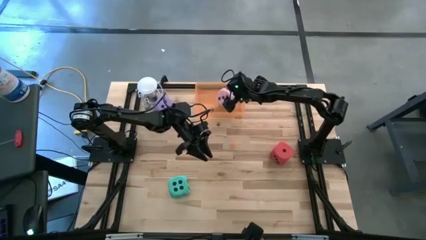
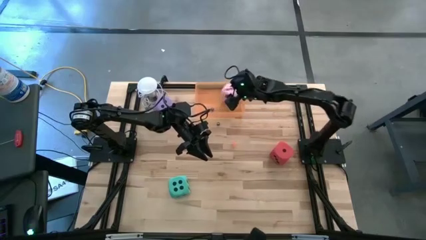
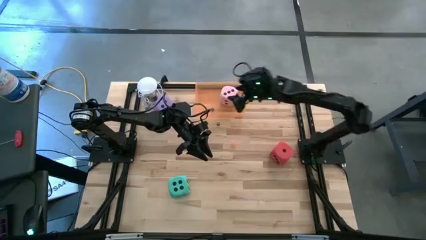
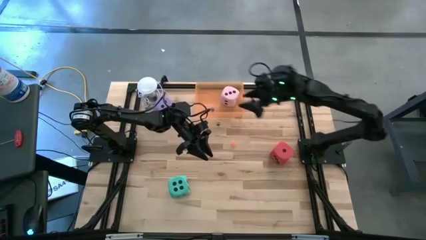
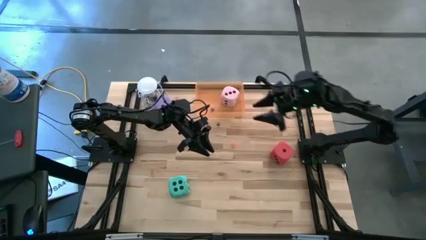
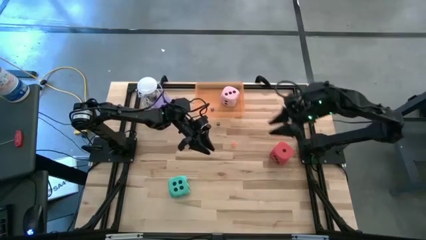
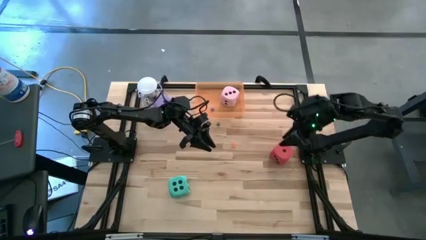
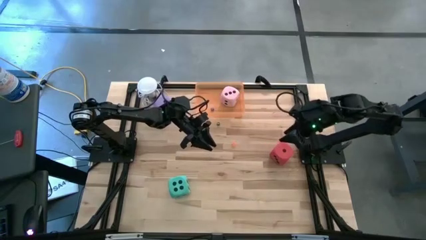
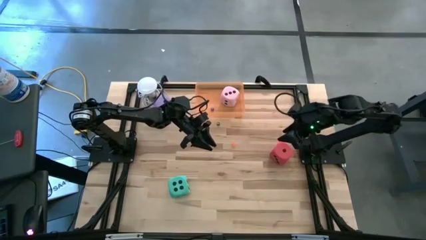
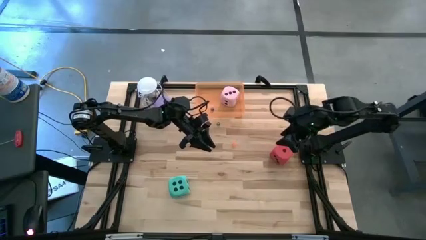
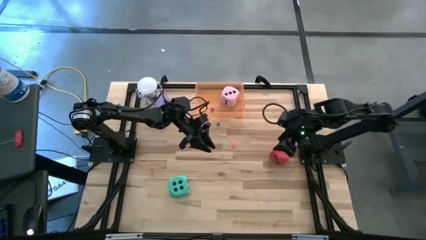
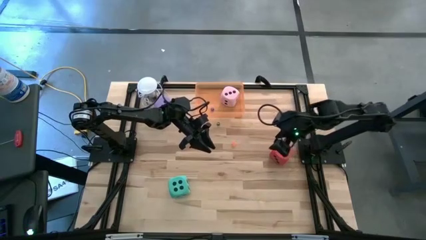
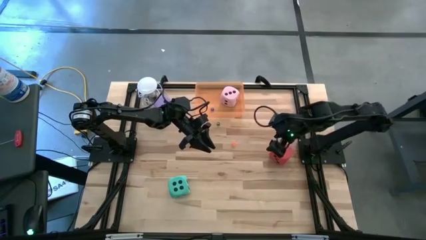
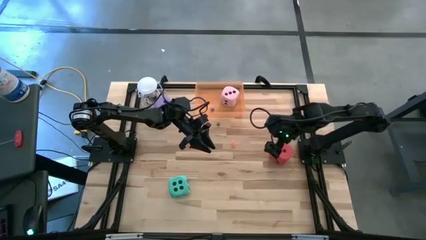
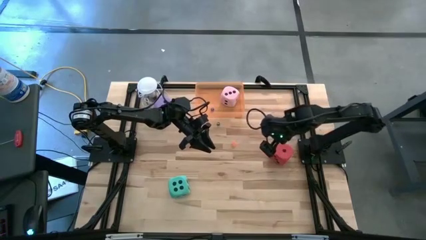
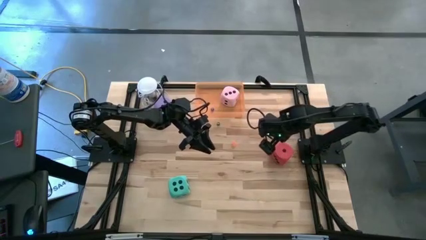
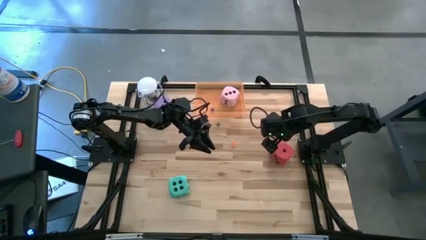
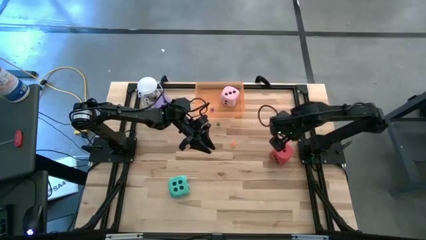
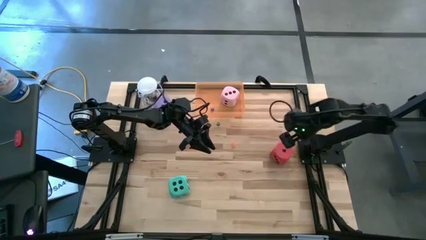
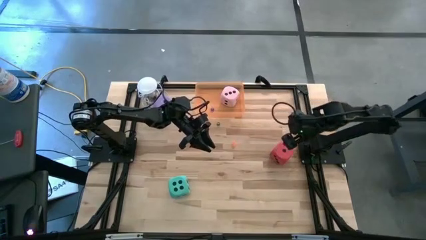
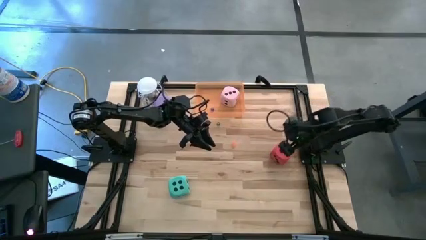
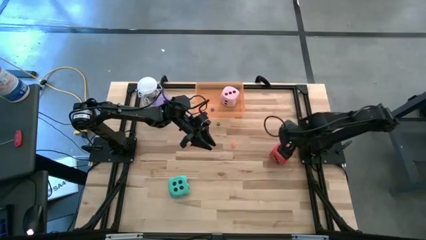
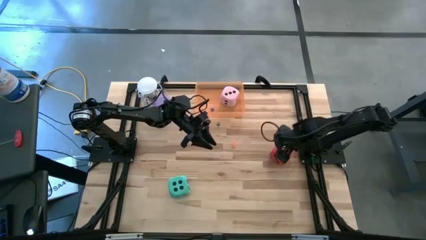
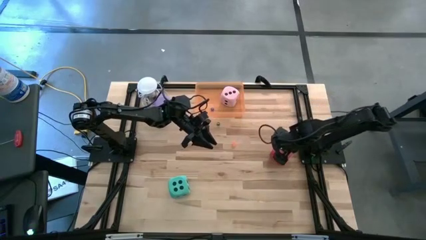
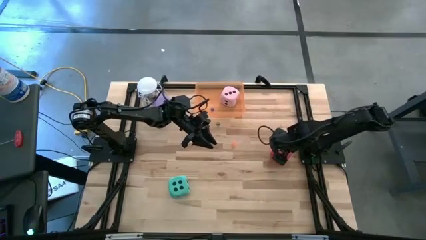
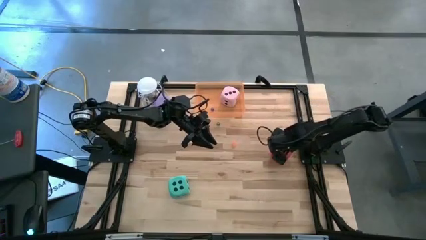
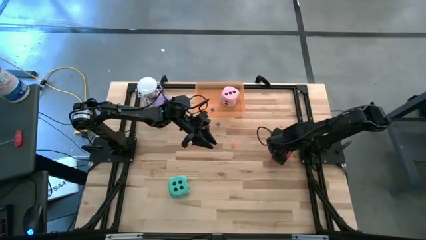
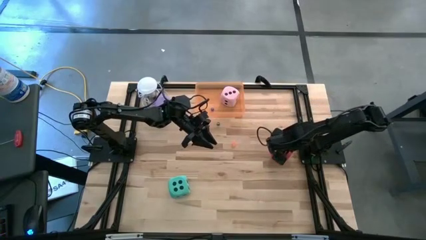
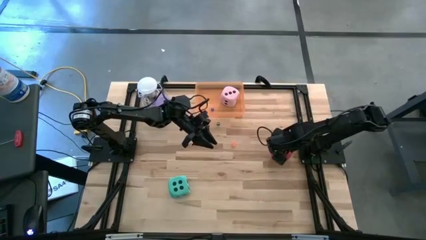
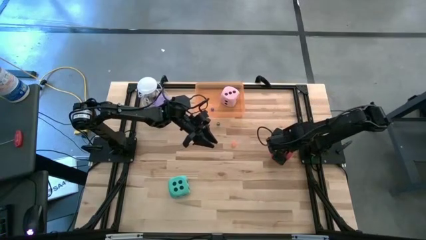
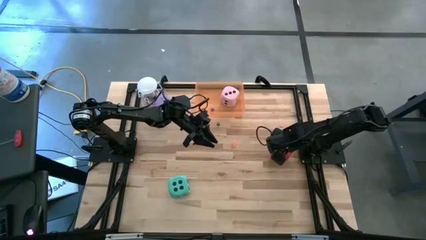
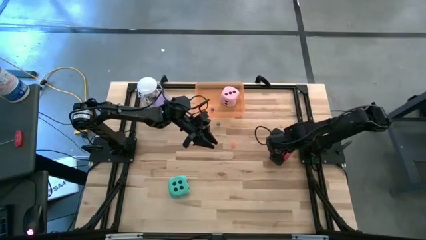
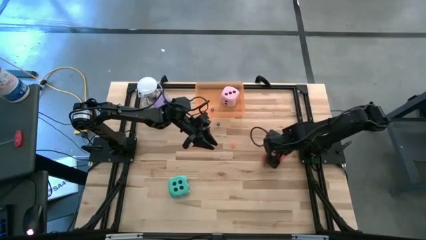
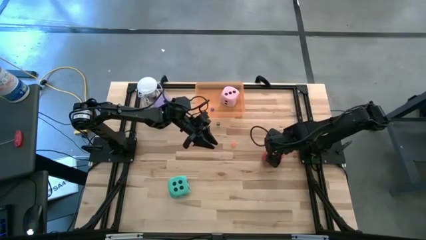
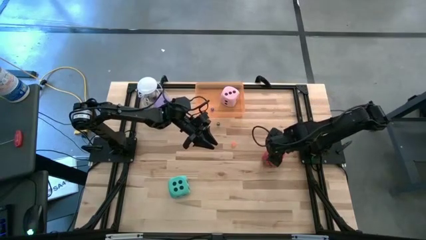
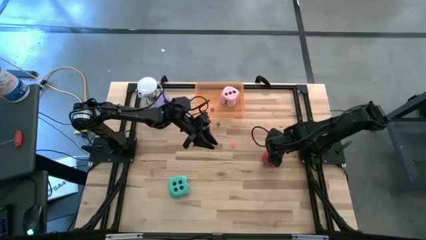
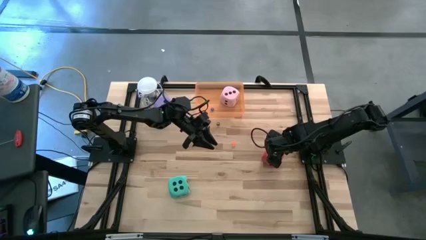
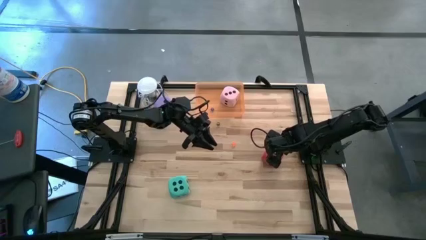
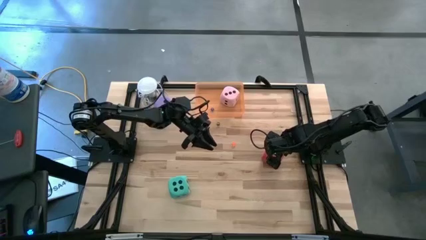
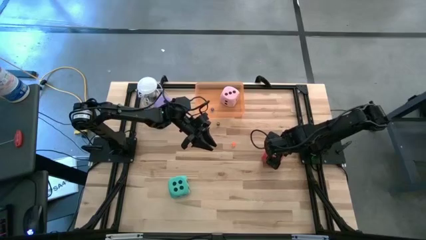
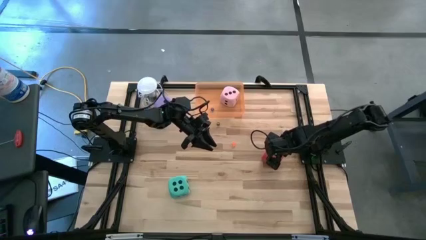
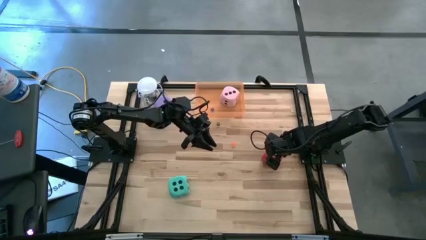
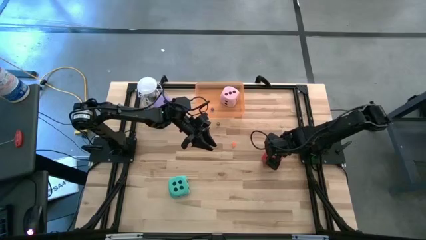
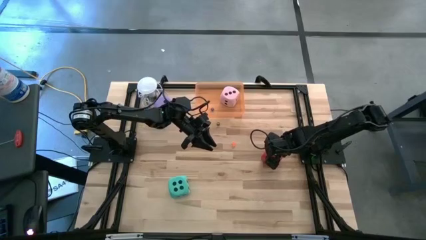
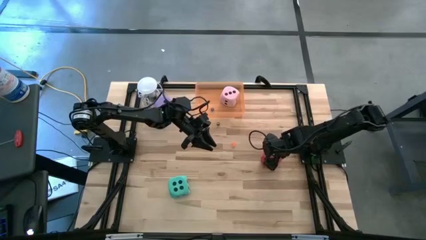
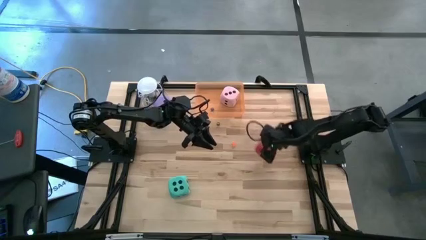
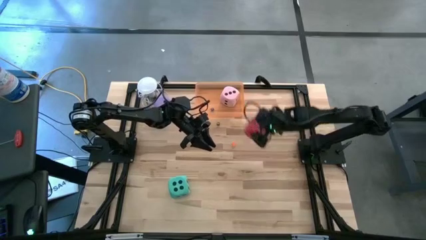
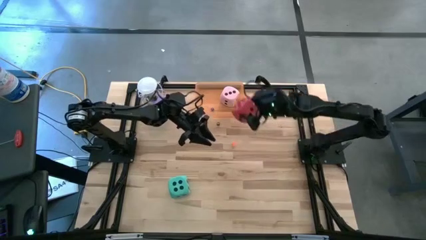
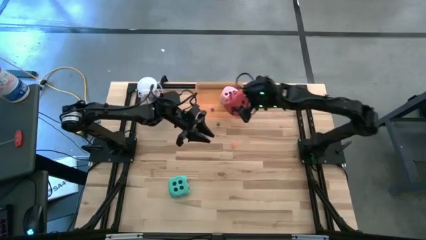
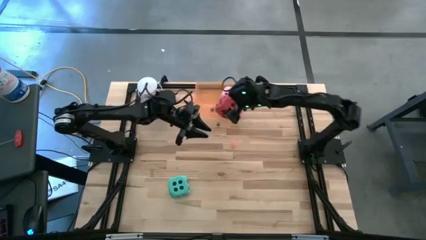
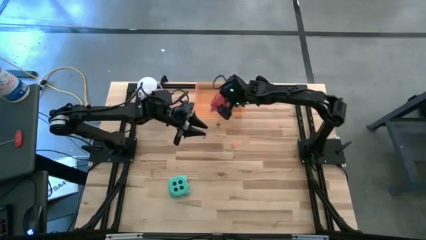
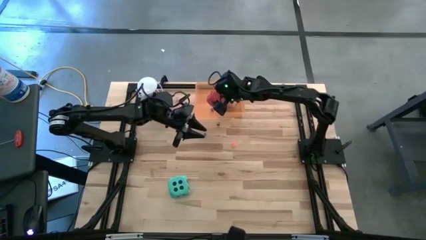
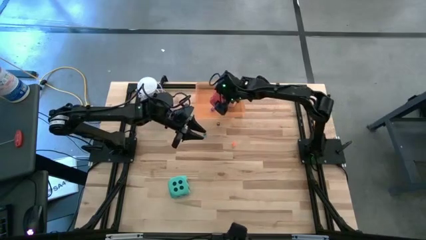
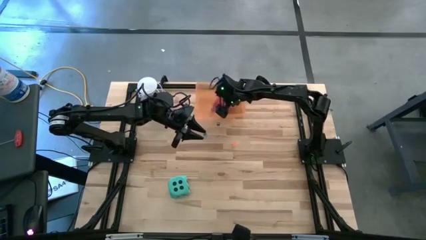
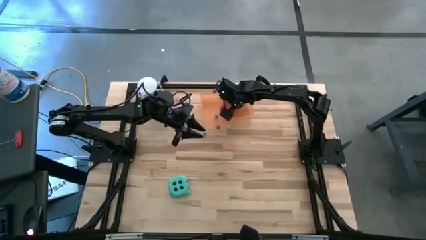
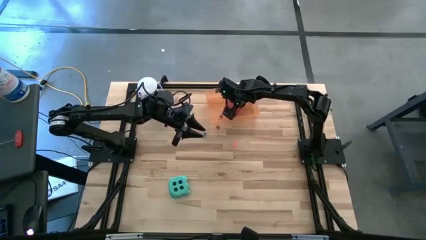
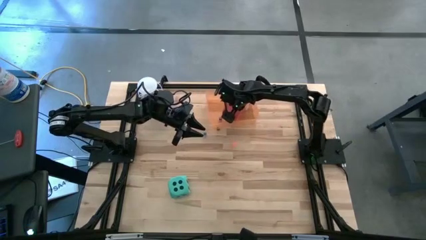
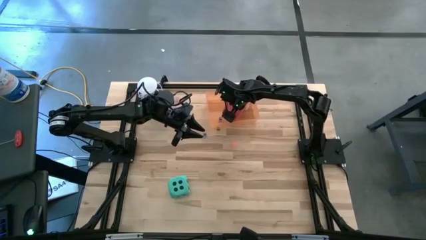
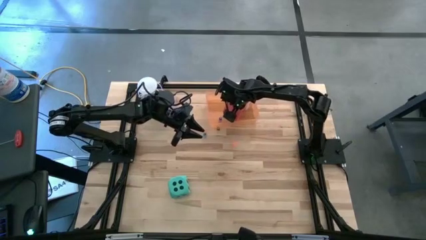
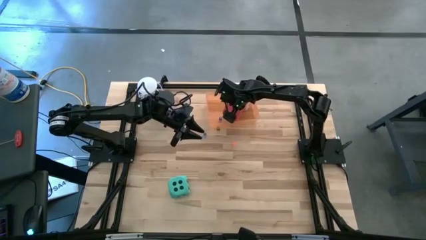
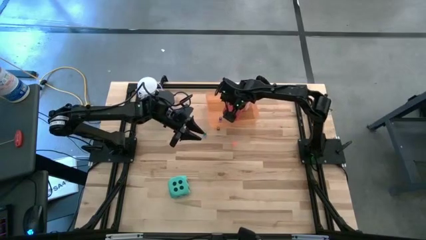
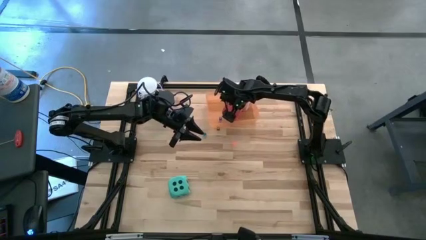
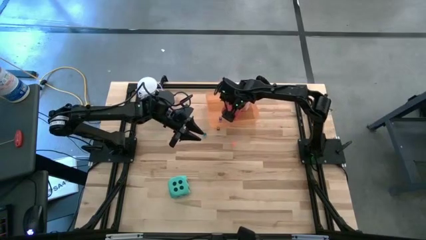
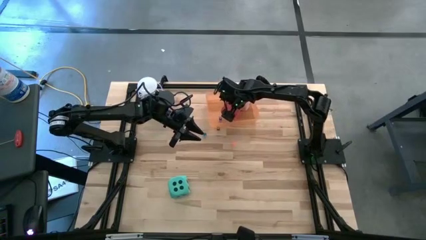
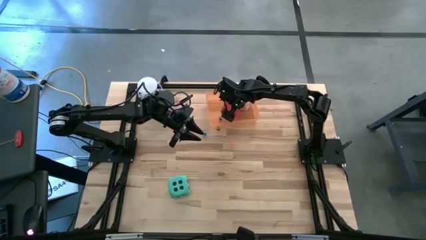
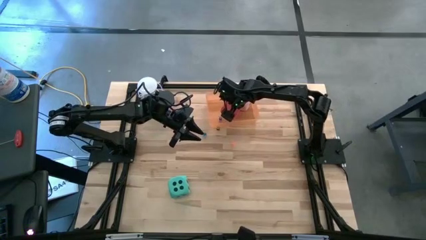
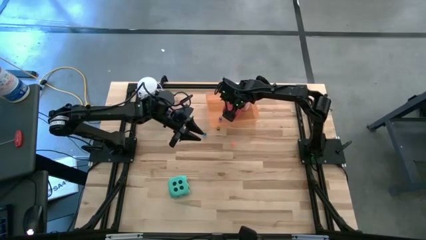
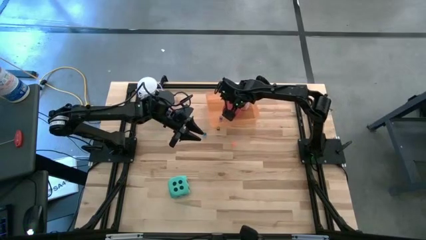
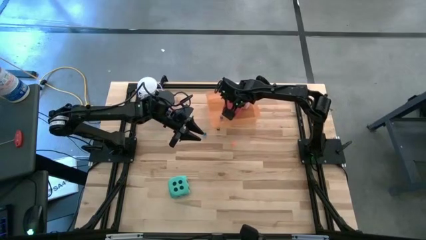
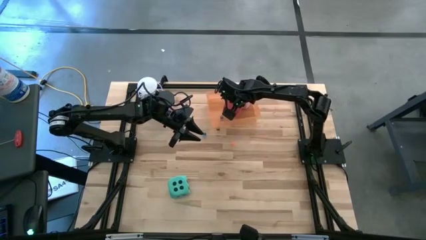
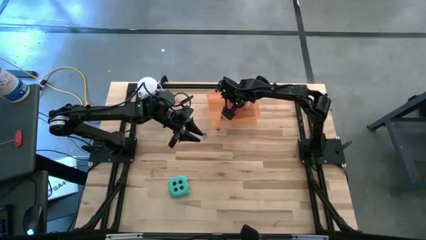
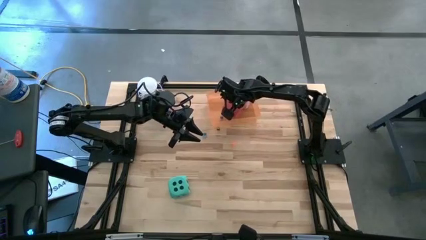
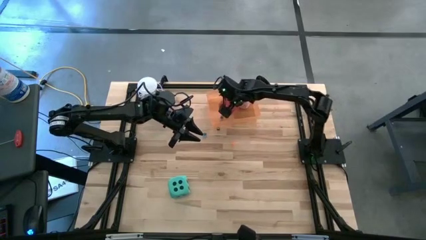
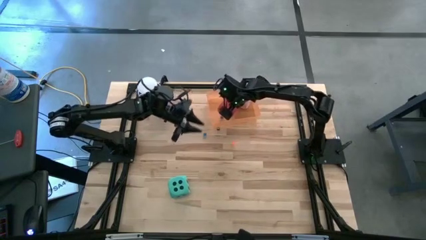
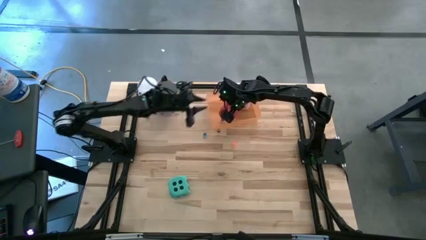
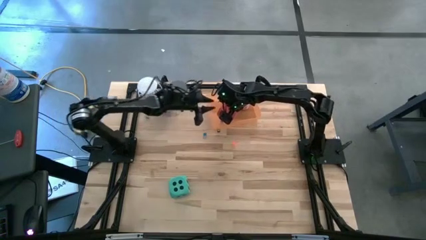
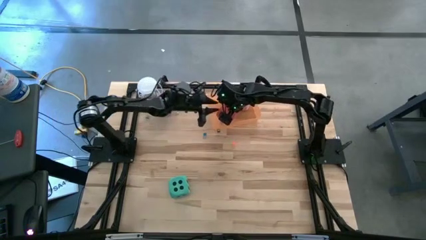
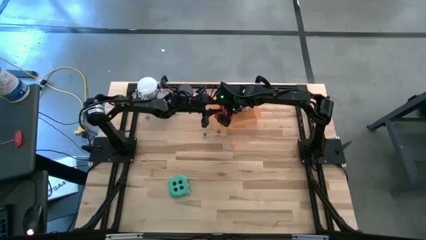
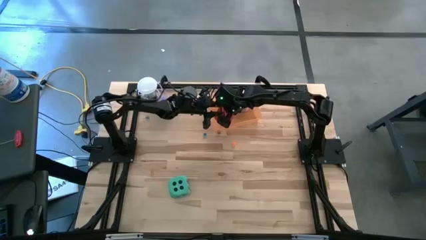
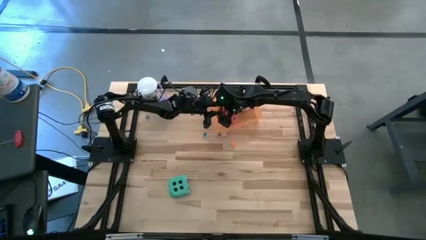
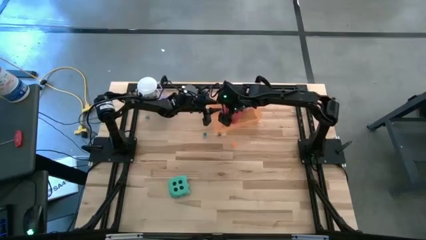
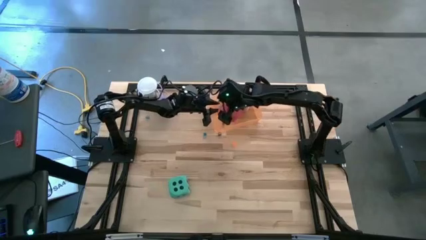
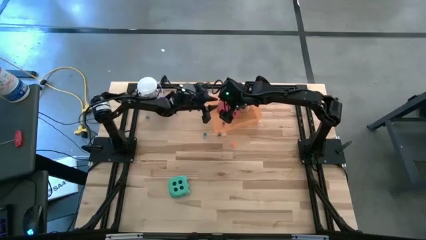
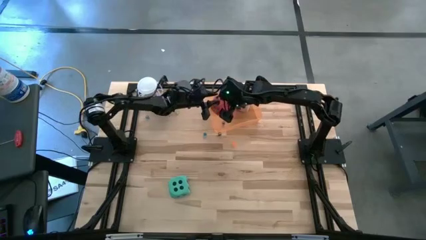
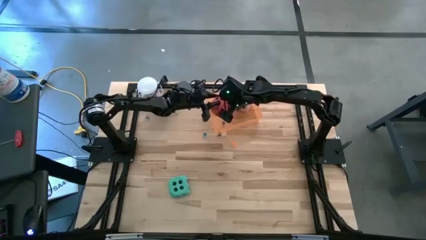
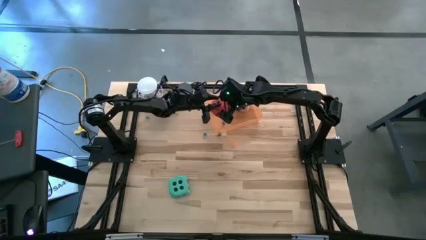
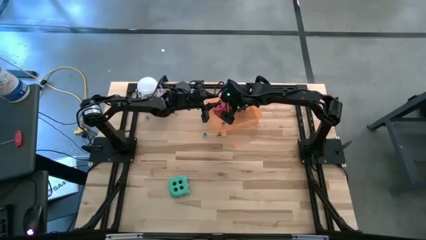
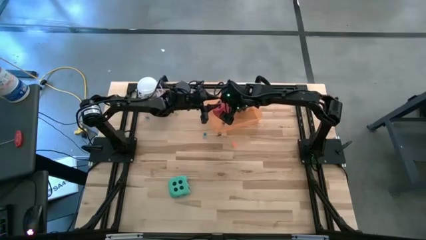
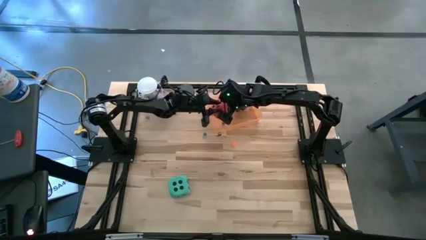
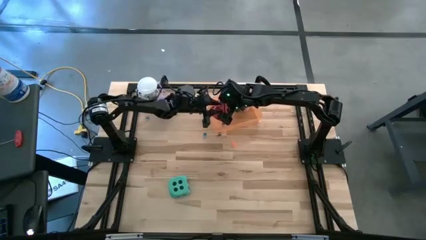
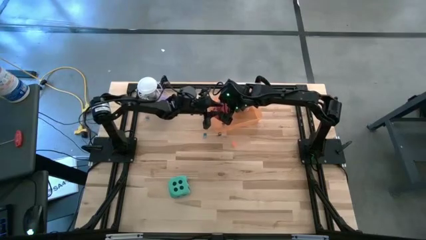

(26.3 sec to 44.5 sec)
Task: Pick & Place Dice
Put the large red dice into the orange bin
